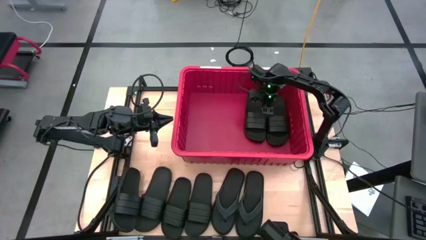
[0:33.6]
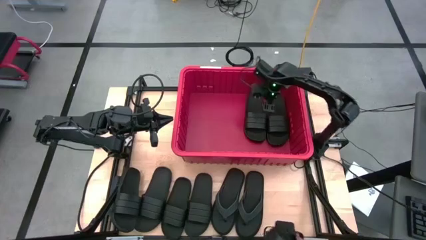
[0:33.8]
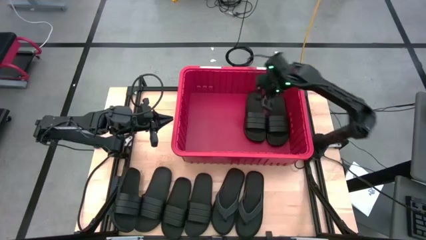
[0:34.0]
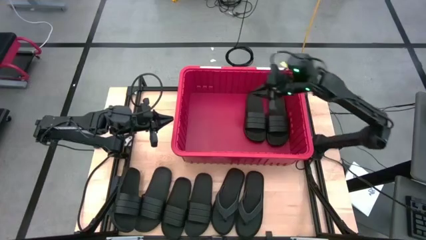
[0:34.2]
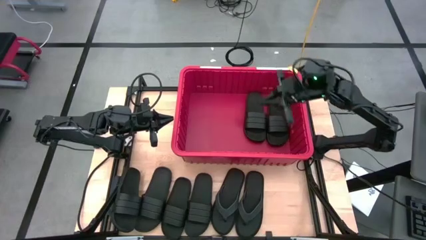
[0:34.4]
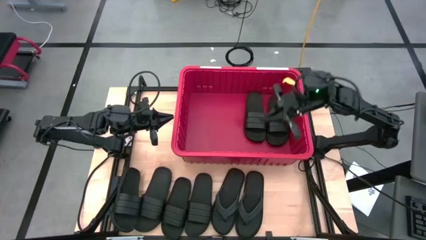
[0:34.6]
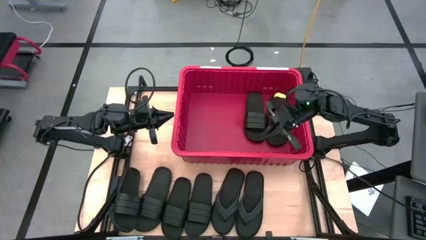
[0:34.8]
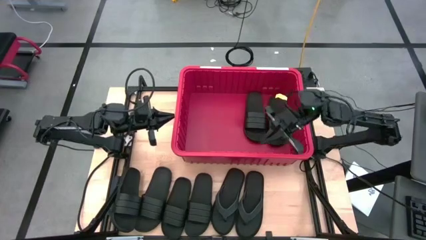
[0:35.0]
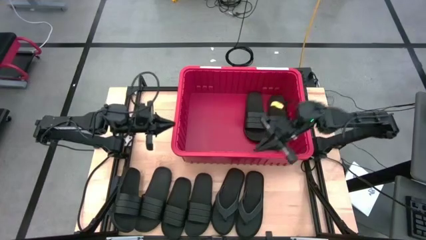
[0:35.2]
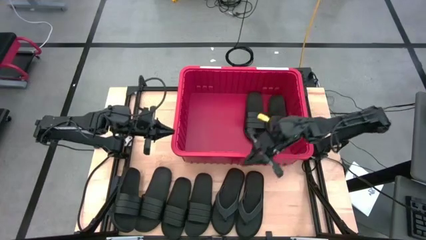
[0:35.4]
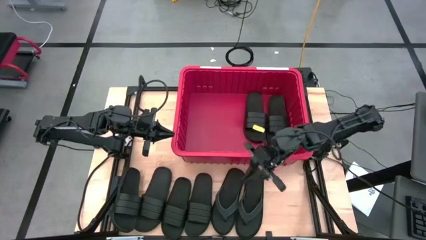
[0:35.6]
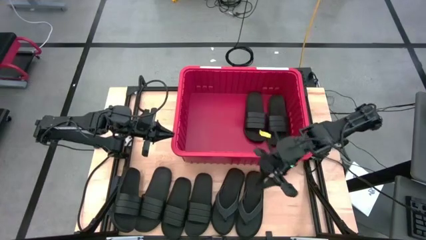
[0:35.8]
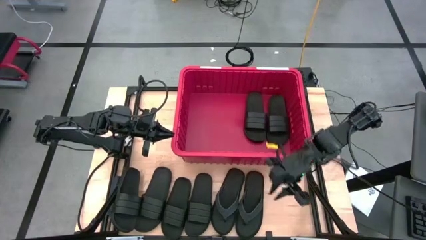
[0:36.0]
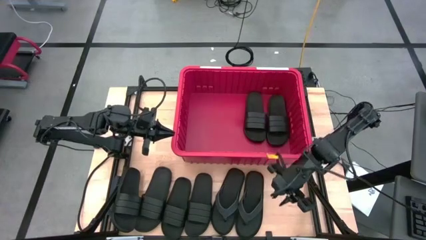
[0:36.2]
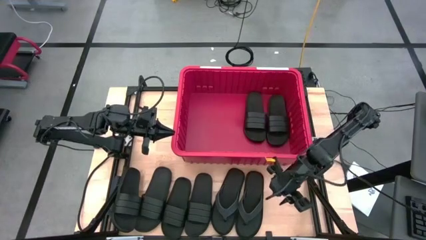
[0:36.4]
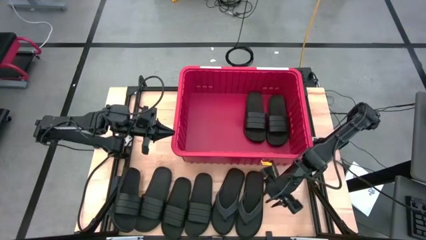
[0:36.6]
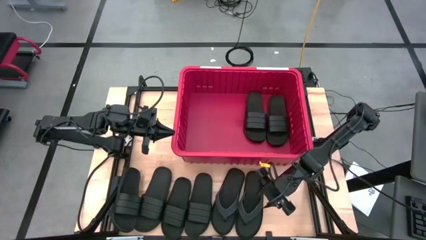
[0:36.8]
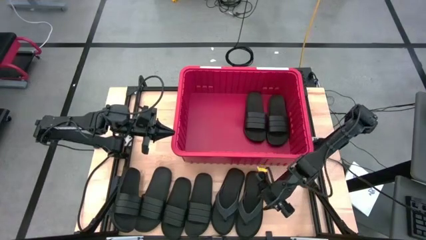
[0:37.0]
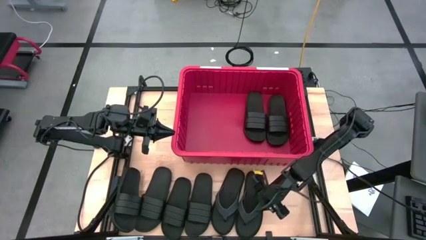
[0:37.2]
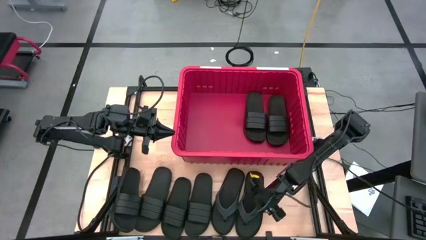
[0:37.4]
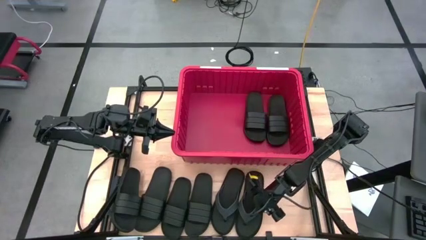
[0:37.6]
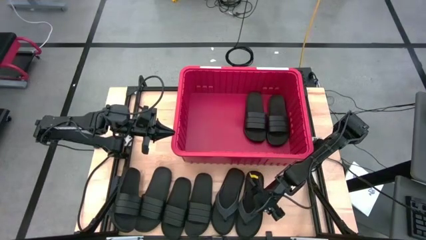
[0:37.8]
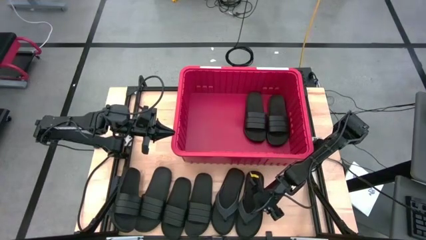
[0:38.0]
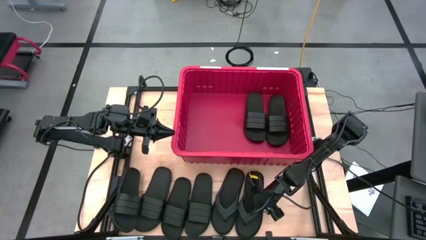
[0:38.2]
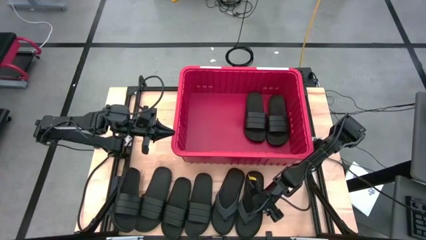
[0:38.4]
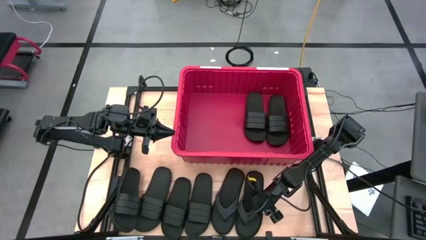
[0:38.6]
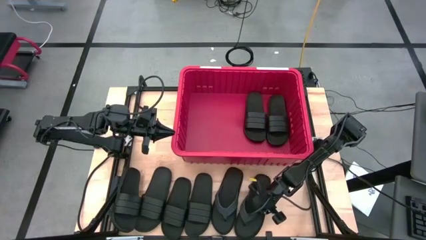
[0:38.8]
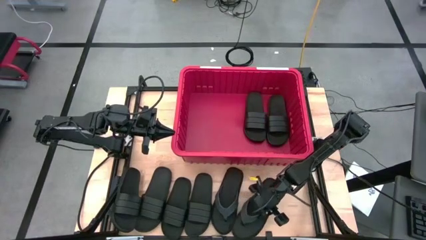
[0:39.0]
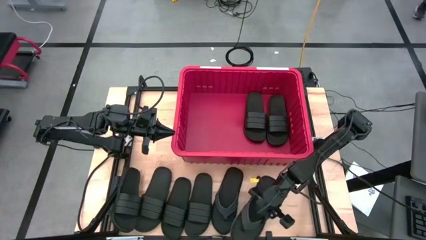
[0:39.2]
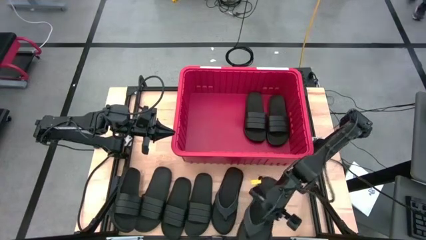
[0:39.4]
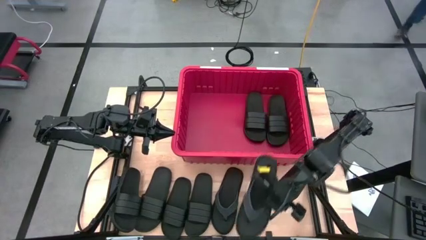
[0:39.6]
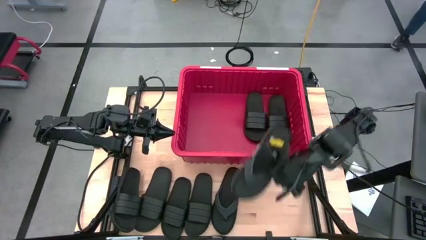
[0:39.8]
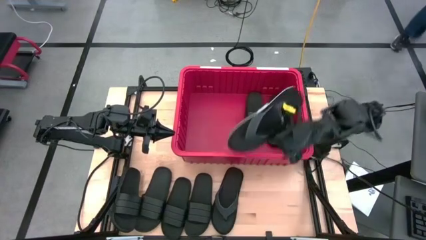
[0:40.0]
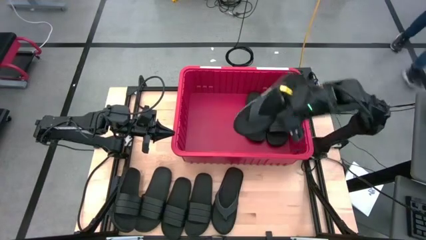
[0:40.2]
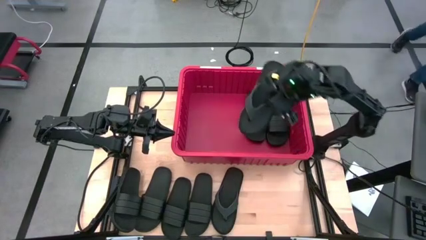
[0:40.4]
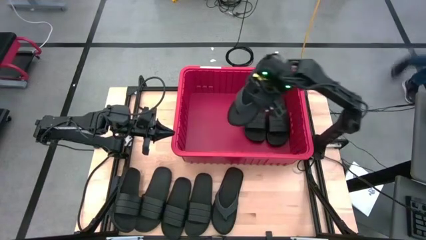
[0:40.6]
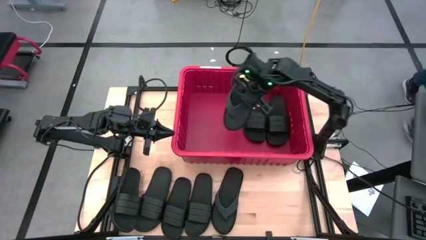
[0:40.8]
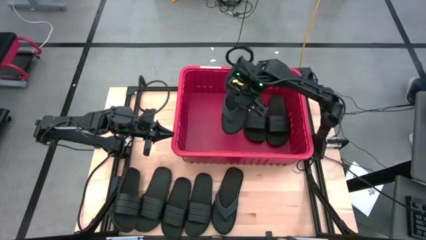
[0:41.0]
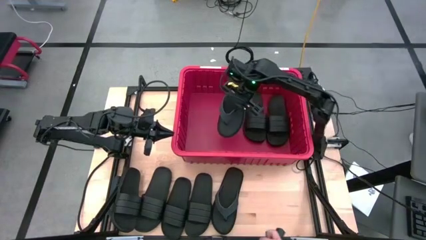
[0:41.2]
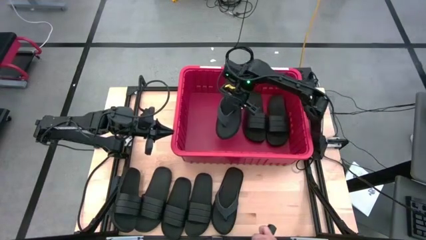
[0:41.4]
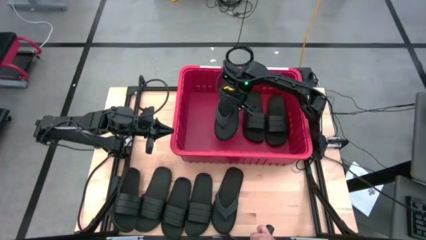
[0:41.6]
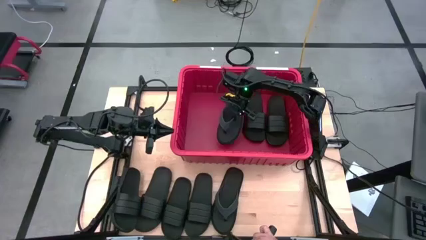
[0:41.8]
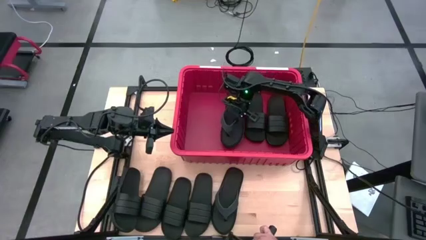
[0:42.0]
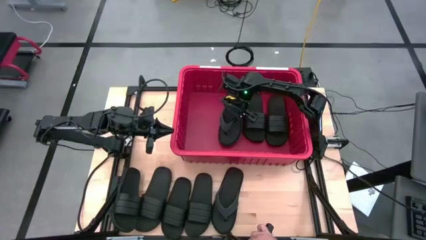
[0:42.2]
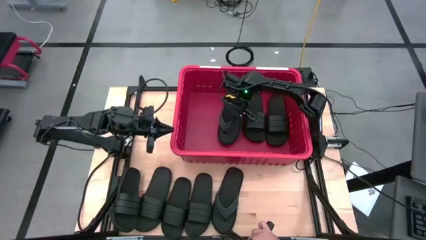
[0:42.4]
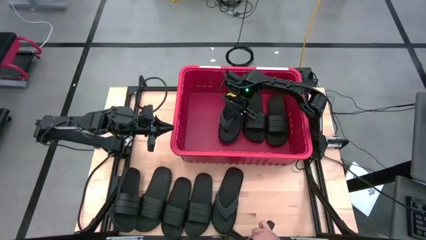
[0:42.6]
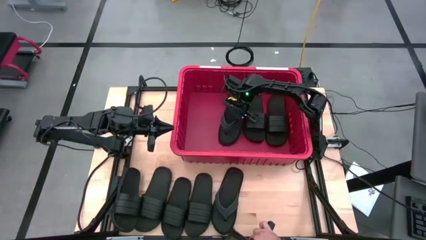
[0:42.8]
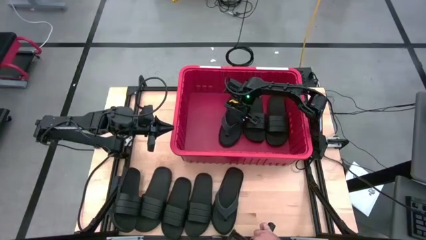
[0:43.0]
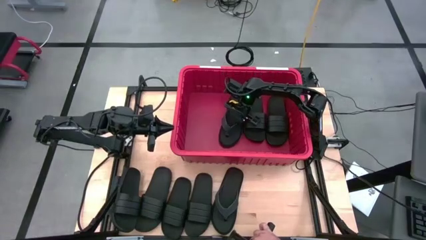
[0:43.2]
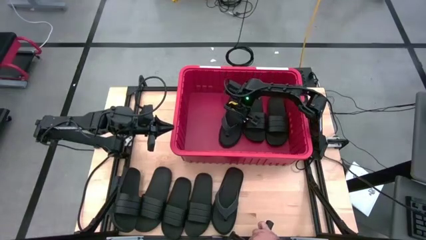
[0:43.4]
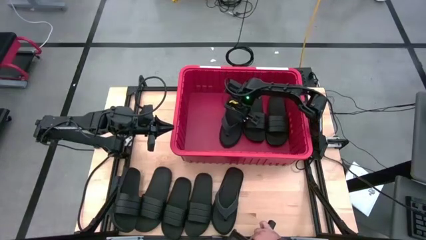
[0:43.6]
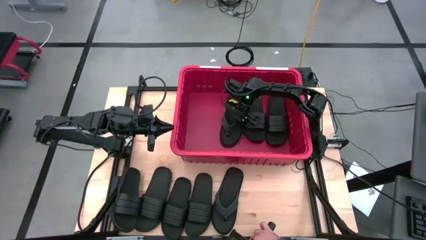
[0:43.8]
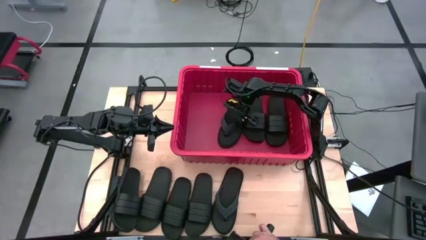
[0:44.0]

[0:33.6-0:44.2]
Task: Pick and place slides into bin
Put the black slipper into the red container

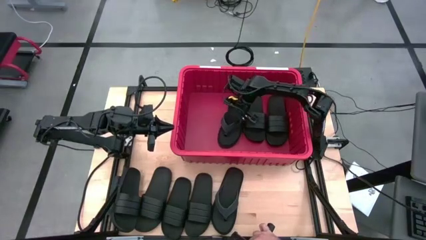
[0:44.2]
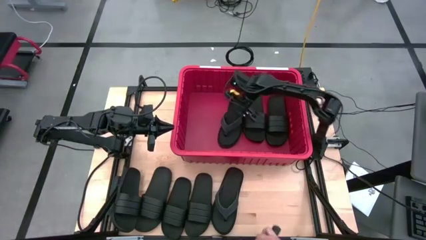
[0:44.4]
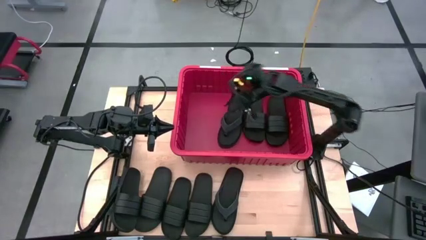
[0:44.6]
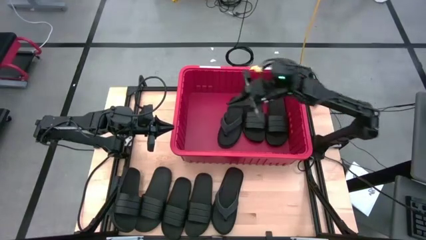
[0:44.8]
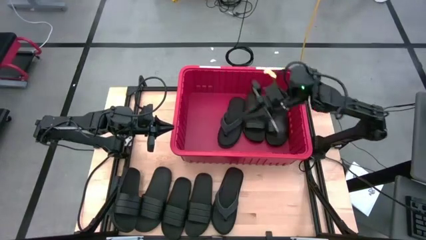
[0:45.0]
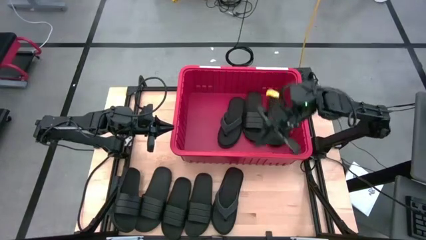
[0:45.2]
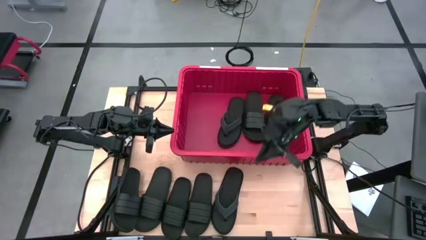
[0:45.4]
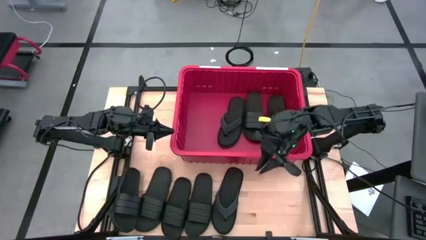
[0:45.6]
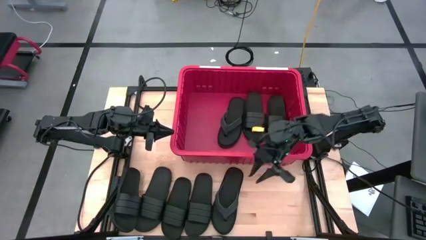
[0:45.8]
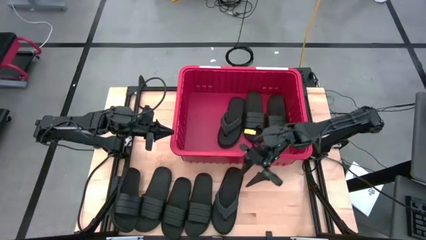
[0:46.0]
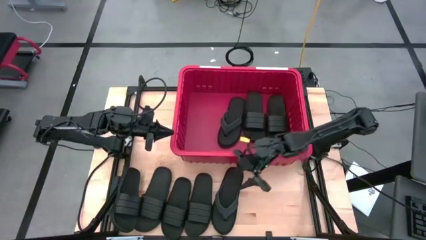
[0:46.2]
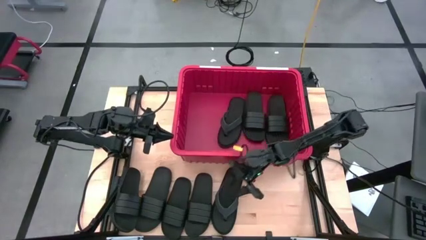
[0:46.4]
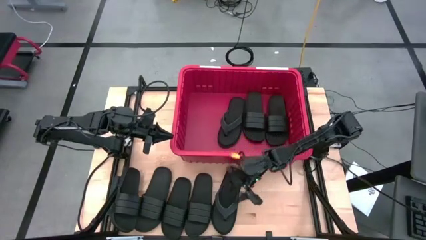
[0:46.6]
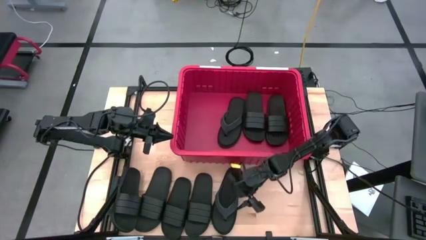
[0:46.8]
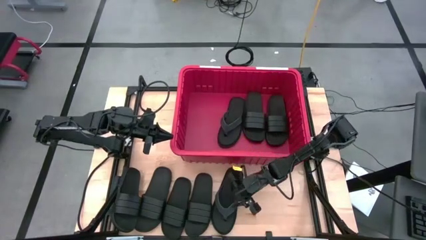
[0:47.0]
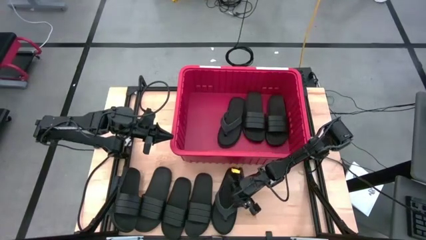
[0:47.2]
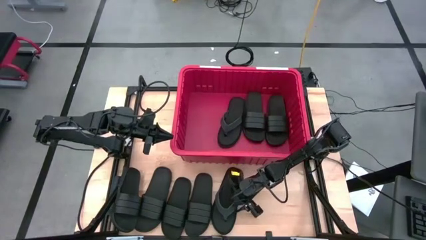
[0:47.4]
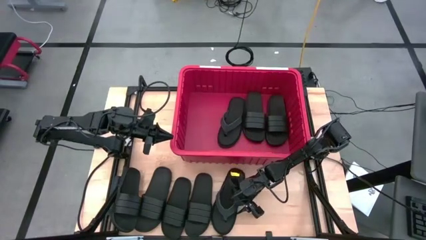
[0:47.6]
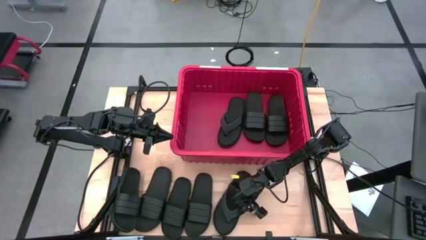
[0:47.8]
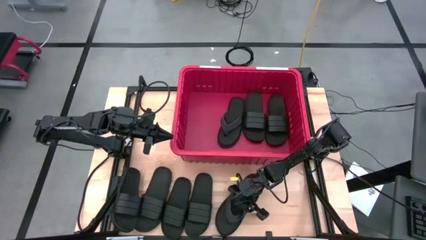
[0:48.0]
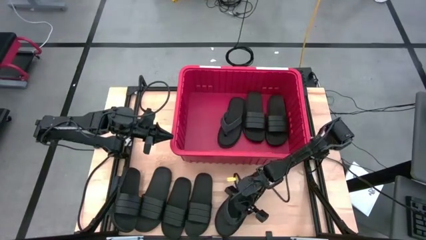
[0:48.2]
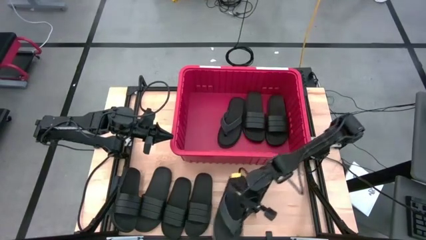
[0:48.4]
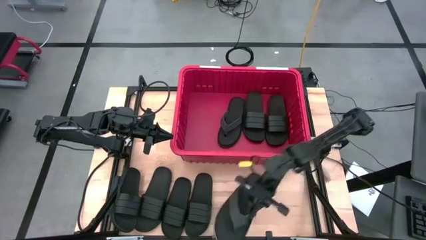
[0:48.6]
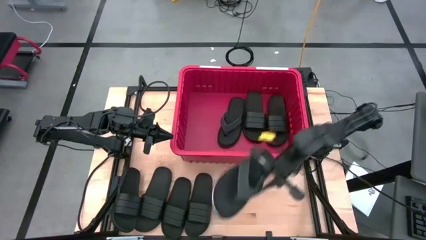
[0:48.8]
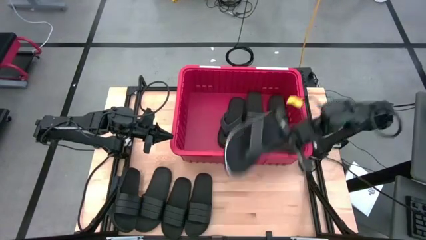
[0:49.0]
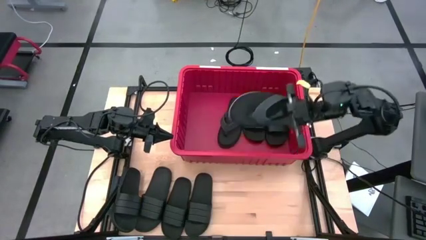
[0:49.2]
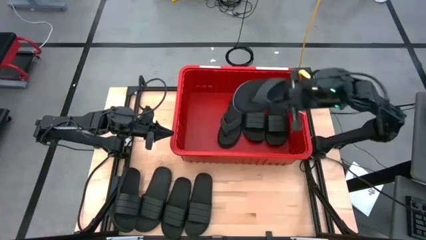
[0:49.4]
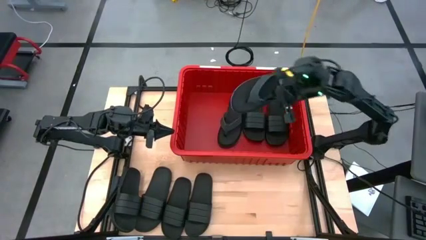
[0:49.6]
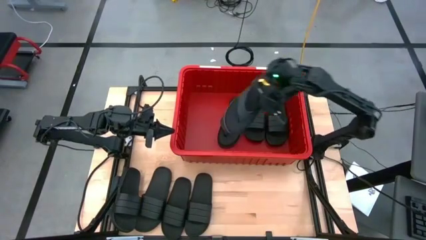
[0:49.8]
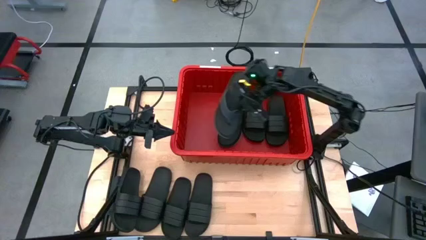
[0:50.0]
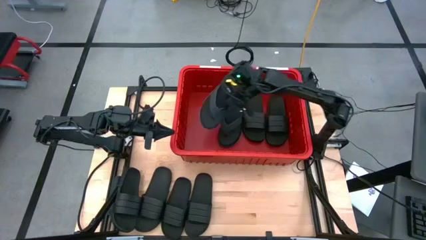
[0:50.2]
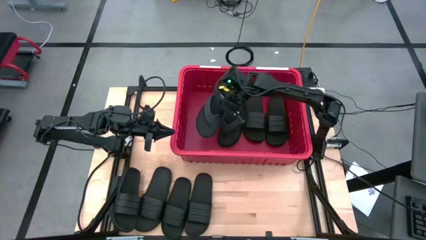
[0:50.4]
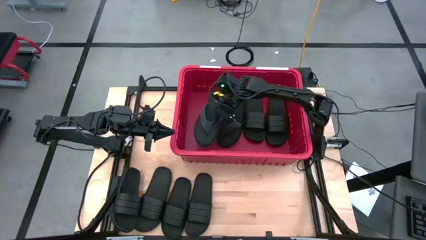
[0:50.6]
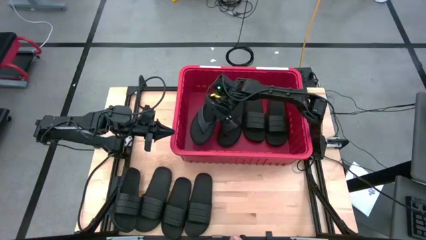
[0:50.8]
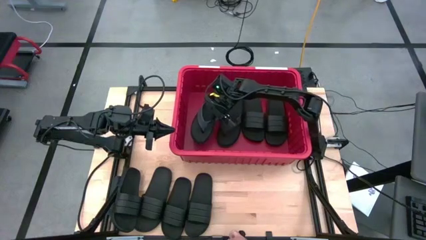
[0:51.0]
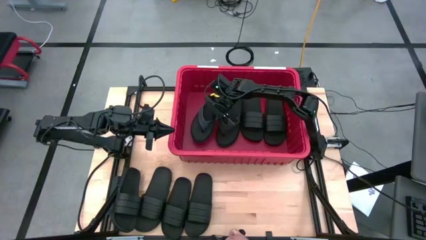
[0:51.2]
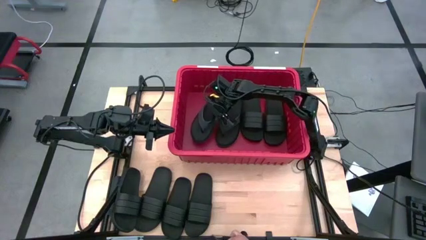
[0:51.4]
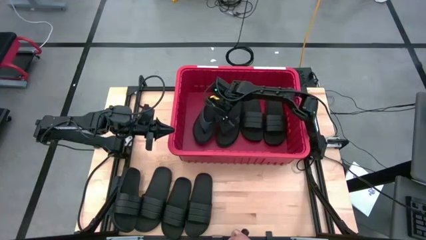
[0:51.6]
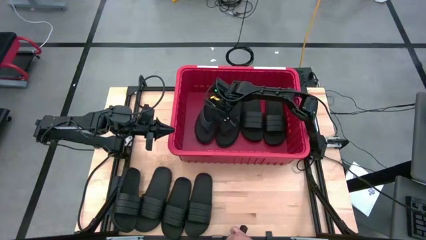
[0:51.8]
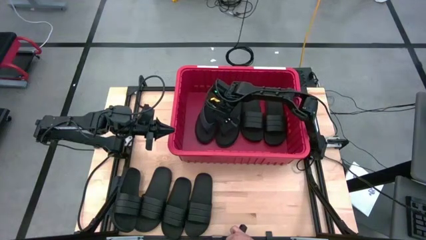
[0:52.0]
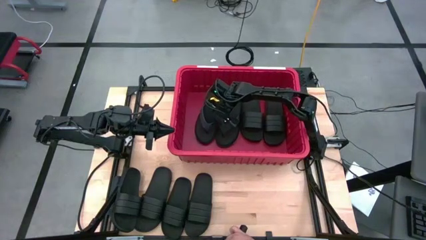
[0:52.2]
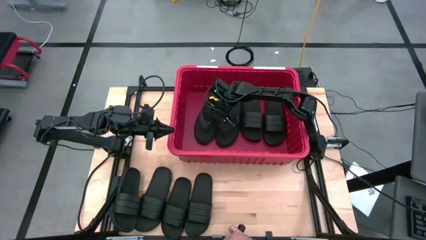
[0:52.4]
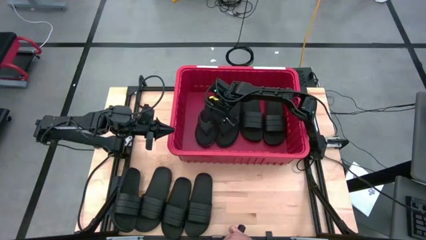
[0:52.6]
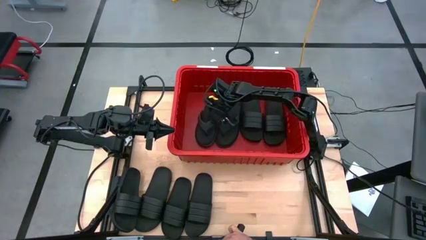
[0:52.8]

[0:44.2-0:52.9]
Put the black slipper into the red container
